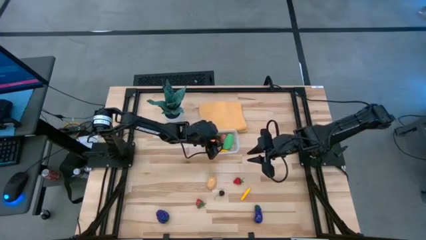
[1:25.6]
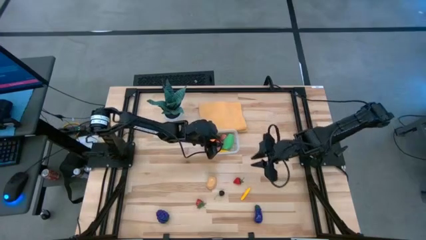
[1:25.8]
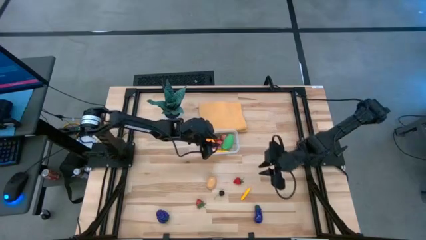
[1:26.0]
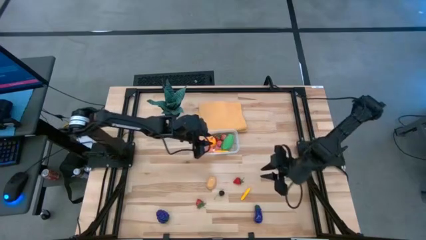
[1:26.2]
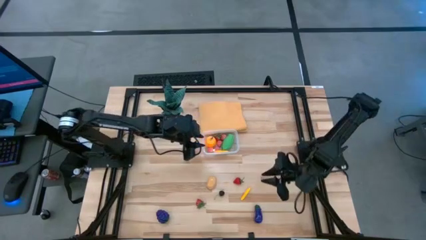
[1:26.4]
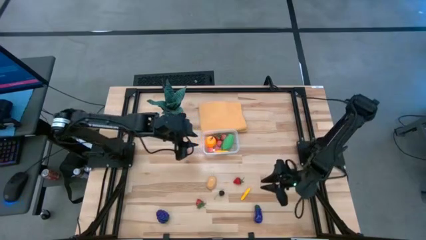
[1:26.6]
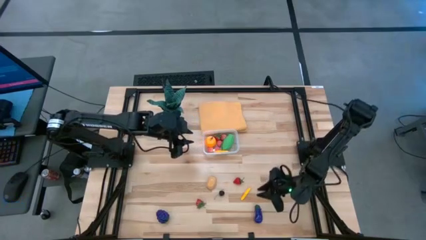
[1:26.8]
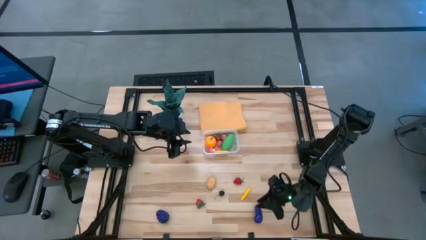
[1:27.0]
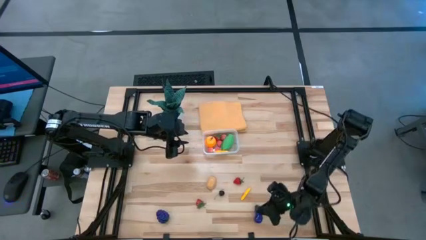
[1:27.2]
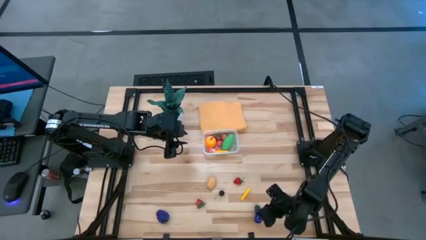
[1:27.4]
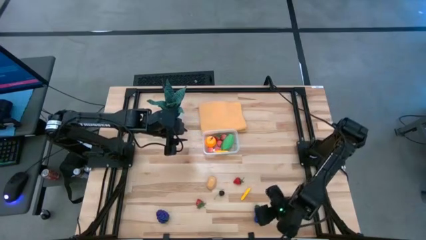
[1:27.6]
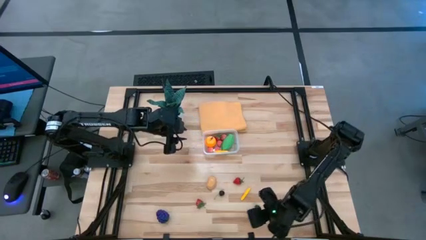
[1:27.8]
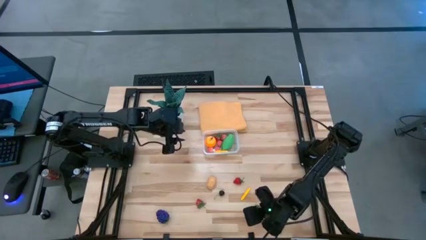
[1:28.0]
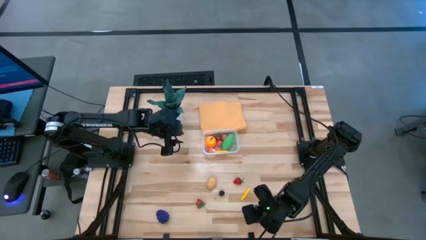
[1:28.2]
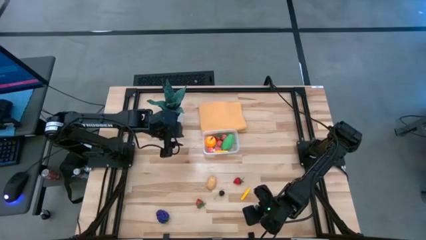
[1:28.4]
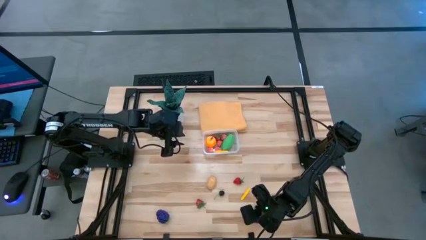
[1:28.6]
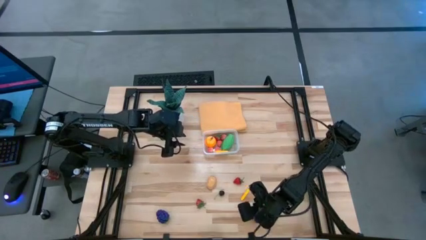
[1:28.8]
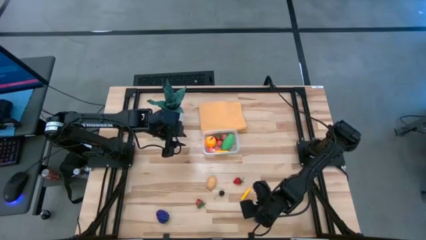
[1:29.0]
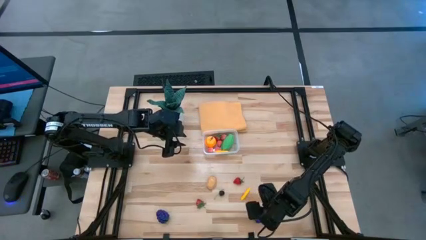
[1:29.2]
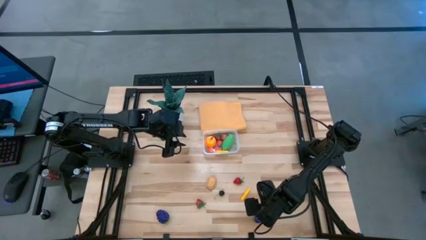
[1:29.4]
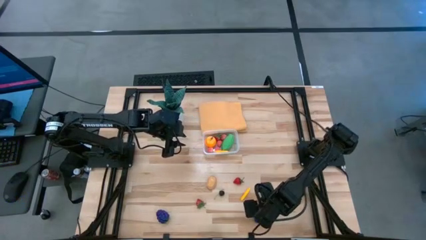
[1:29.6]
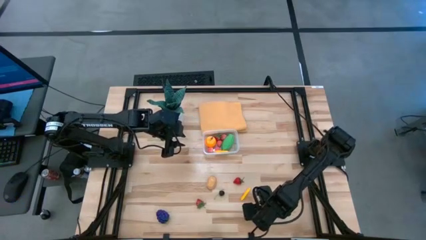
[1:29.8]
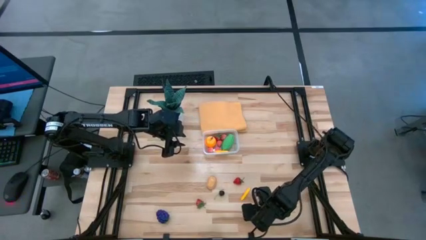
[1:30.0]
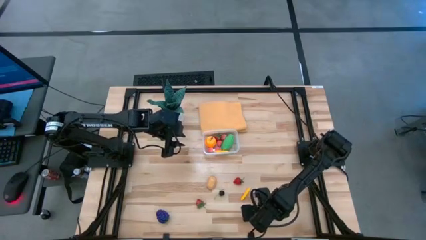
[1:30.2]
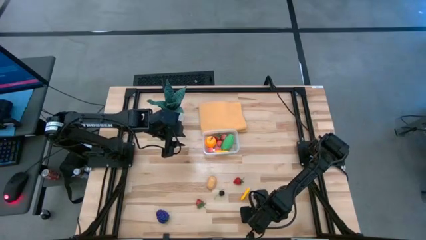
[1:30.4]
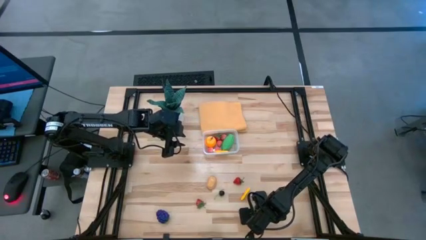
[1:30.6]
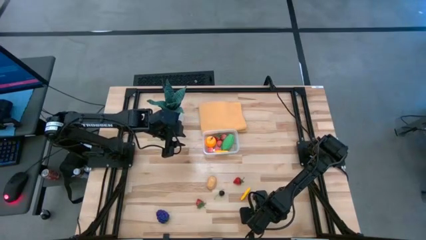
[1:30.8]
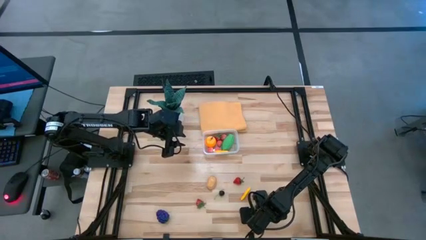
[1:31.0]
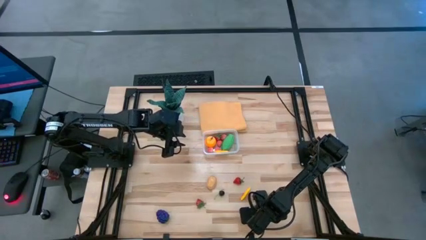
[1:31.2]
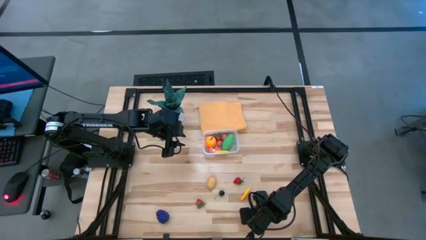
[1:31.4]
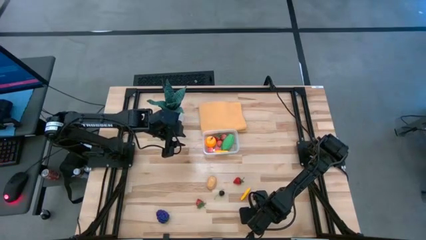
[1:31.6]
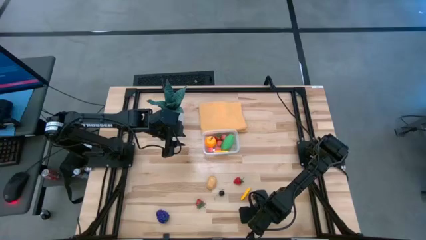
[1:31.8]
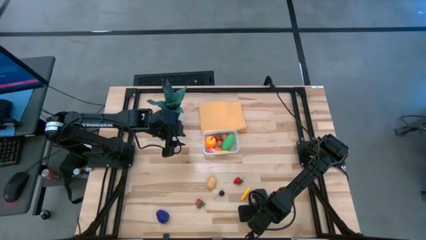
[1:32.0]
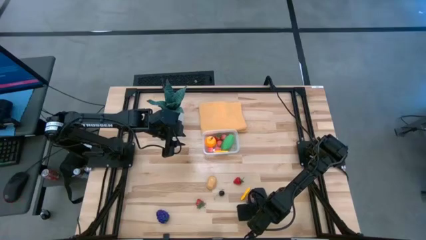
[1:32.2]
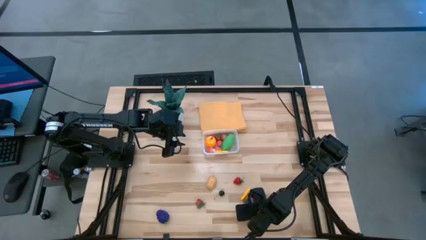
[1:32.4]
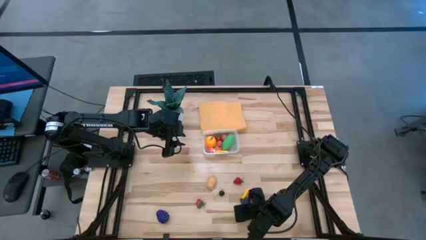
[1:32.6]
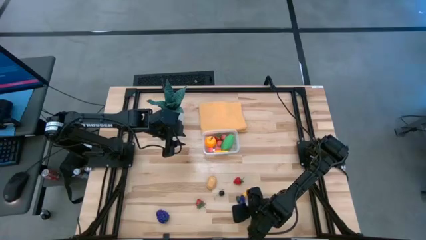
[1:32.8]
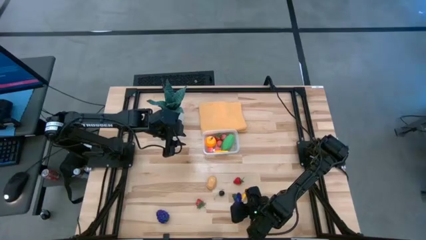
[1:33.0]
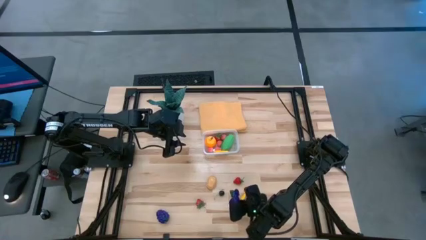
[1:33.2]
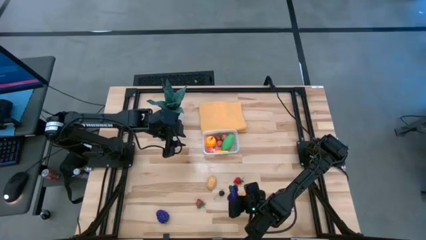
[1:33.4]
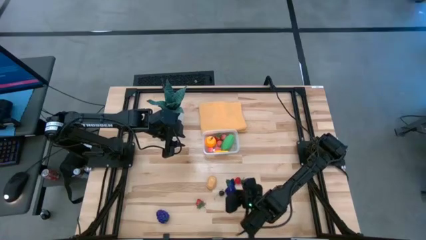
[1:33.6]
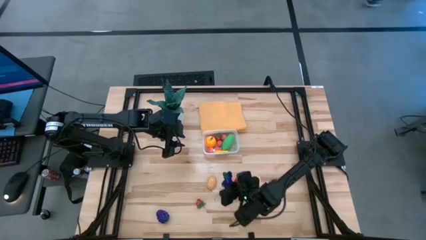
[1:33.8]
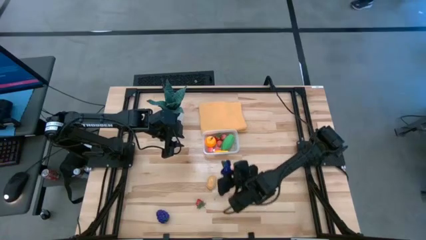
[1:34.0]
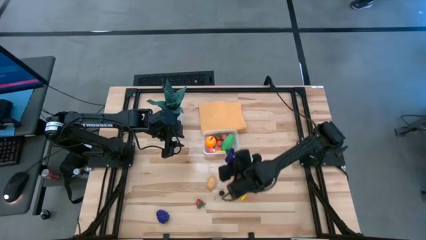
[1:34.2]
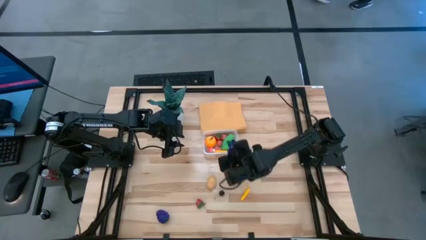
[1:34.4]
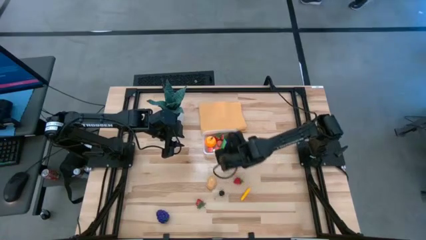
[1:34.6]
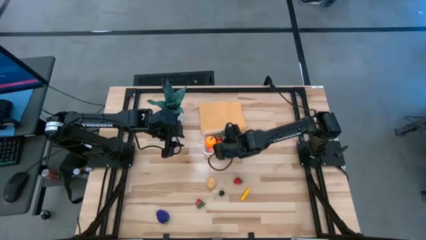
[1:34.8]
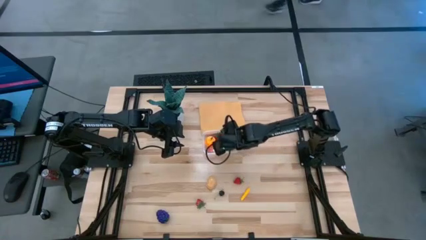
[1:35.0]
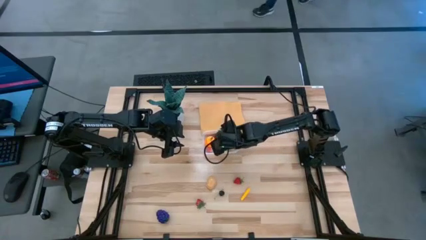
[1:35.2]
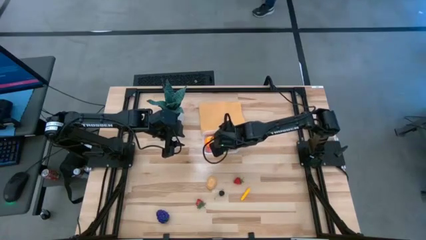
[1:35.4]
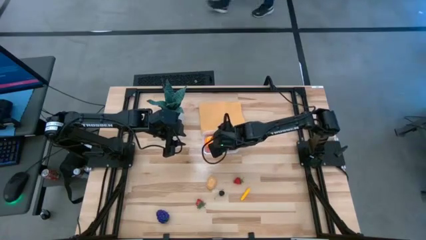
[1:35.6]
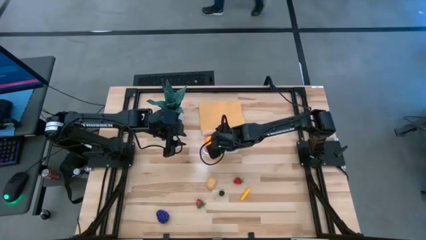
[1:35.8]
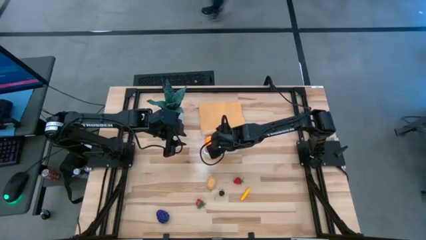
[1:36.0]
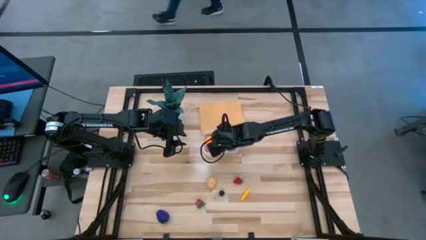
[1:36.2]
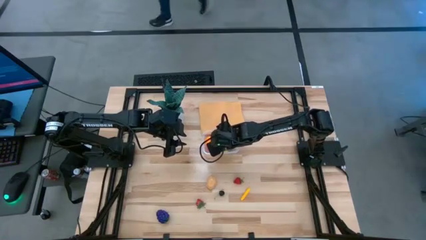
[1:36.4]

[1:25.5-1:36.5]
Task: Pick and placing Produce into tupperware
Put the purple eggplant into the transparent bin

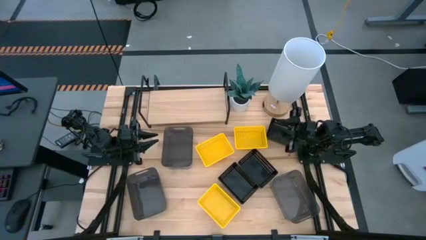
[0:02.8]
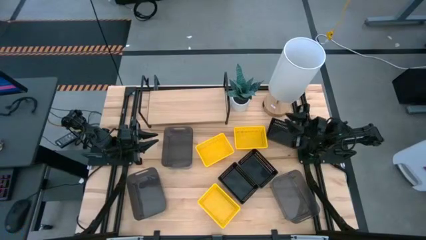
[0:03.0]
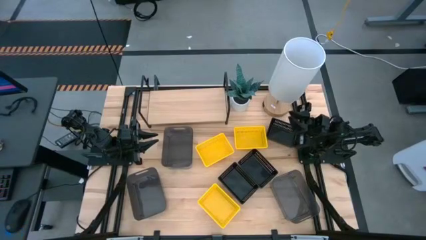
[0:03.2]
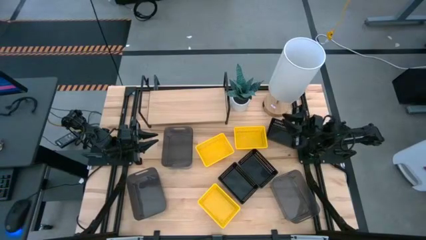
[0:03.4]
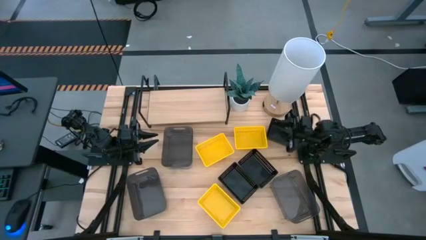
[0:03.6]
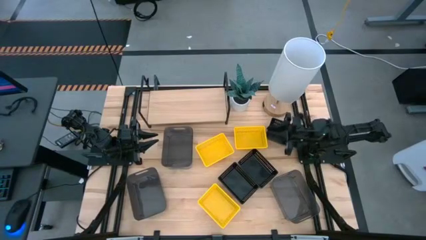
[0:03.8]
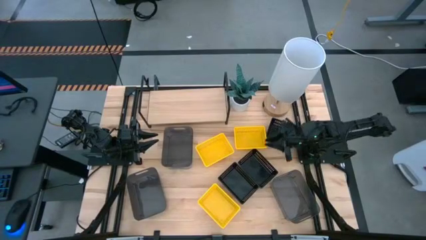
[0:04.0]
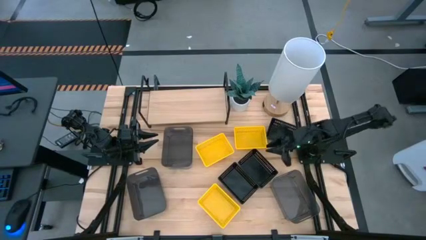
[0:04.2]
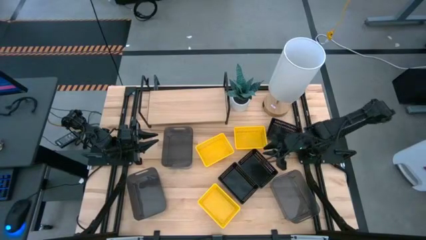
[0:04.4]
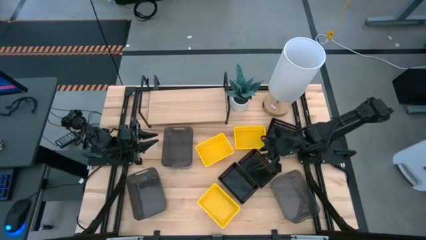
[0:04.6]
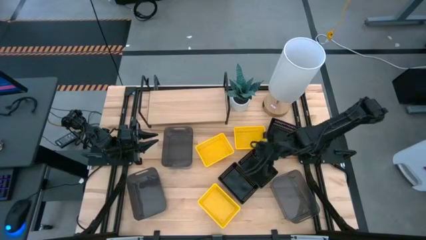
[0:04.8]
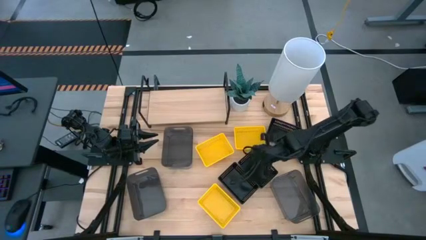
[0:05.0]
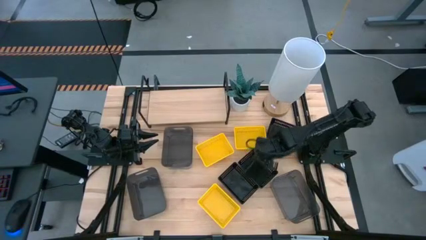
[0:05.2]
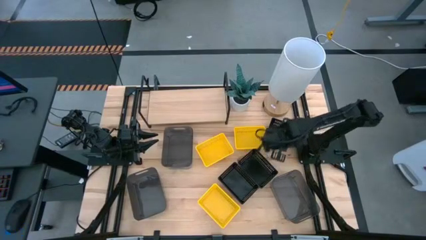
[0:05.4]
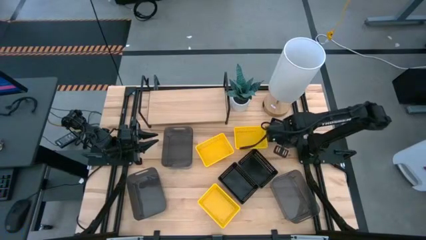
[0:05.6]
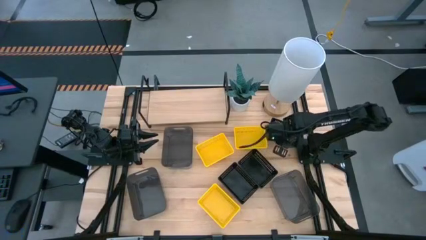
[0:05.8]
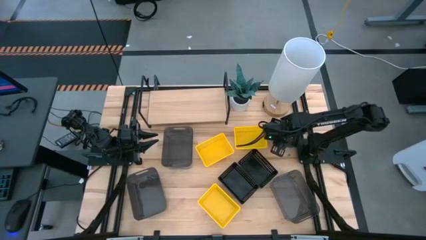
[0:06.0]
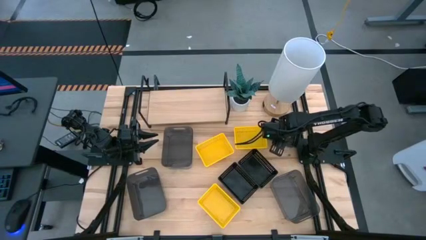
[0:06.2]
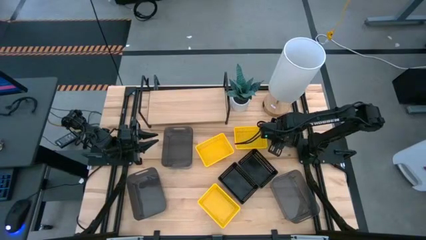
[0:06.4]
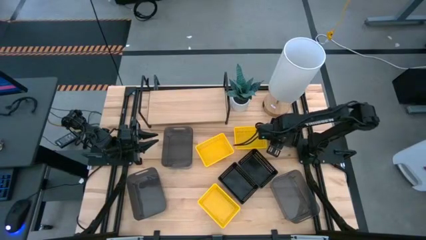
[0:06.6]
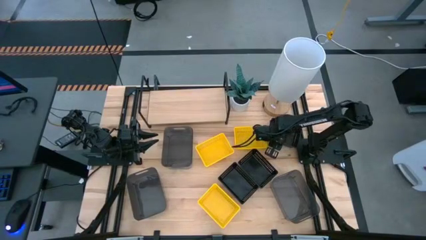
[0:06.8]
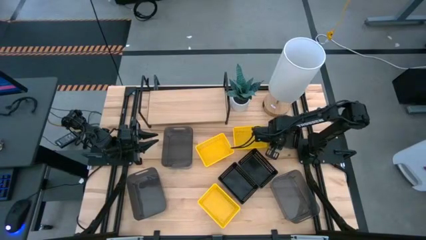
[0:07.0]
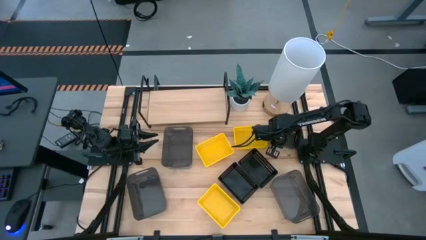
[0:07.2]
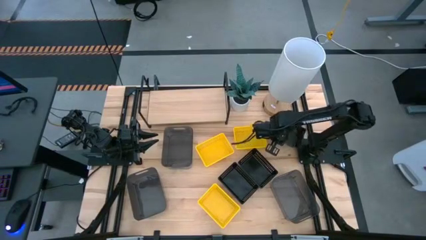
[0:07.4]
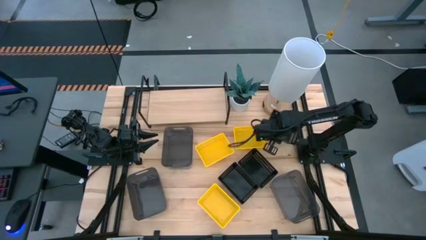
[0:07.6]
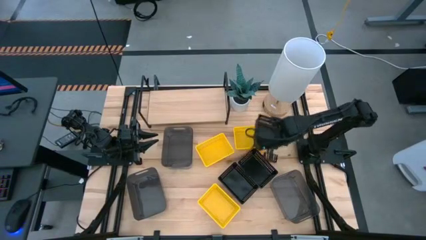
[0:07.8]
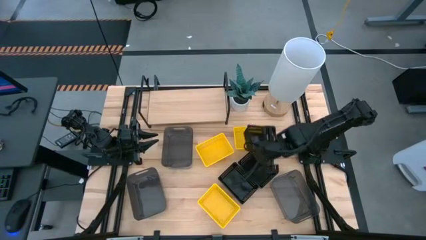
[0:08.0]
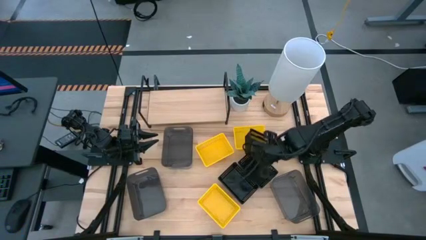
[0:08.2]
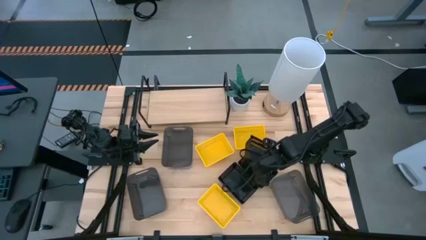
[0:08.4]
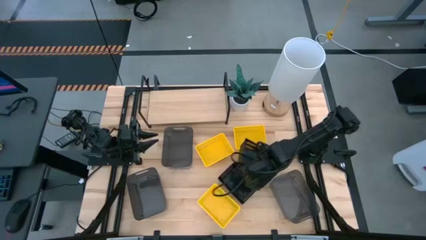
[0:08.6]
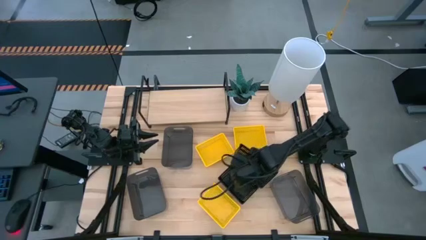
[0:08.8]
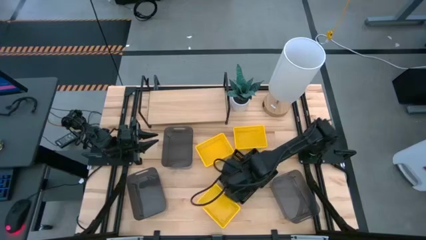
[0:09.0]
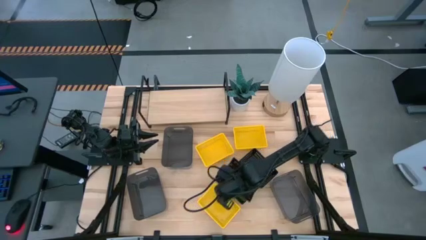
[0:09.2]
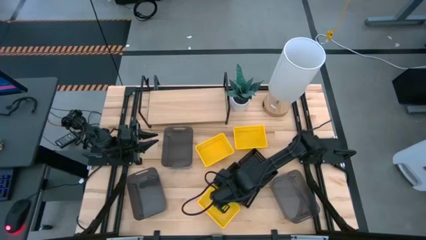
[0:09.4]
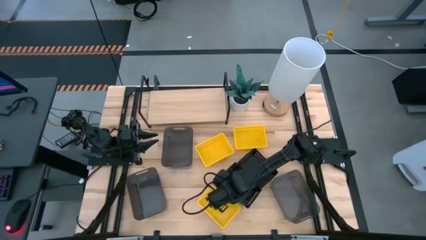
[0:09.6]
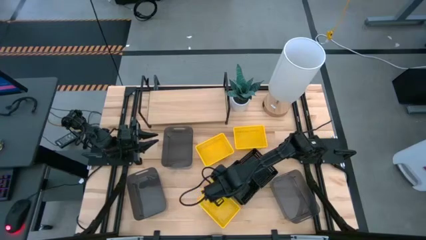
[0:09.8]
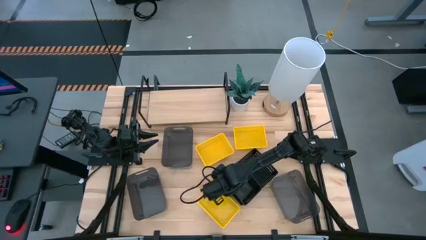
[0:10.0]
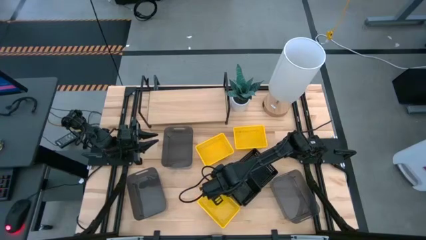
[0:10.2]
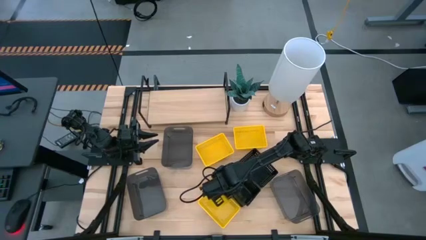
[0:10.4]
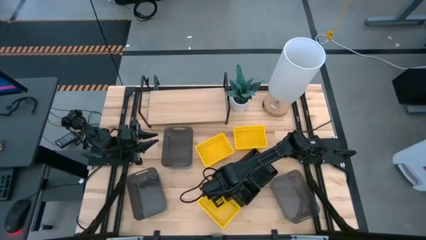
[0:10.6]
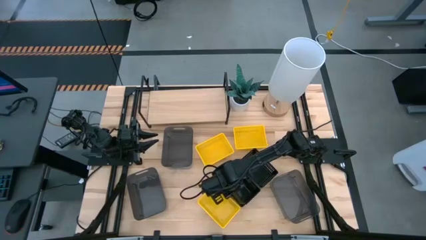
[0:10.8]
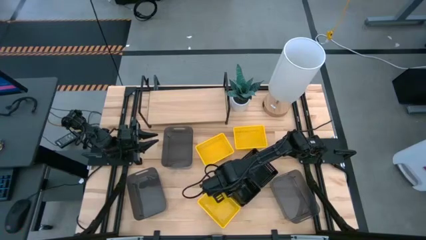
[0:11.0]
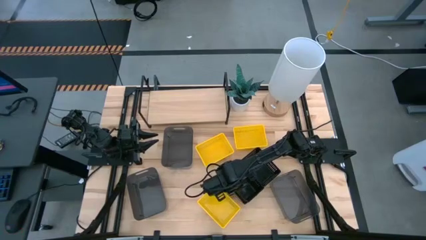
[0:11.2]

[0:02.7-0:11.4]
Task: Stack baskets on shelf by color
Stack the top black basket on top of the bottom black basket
